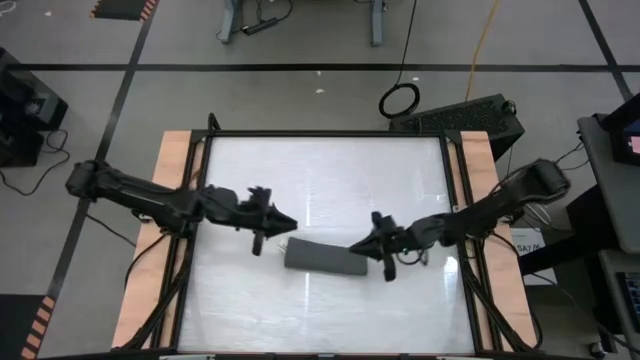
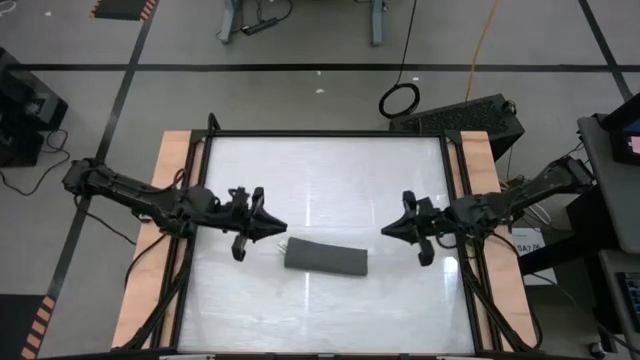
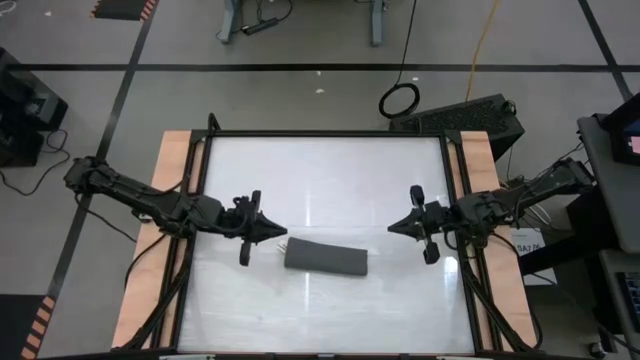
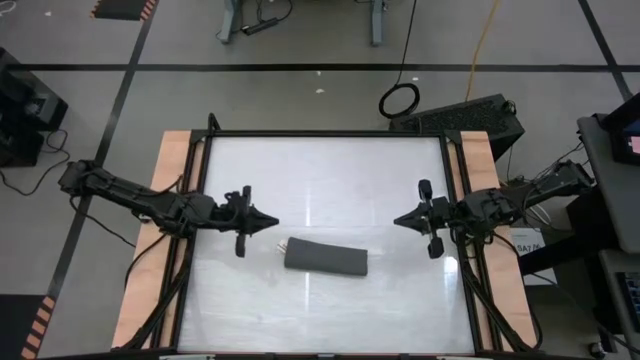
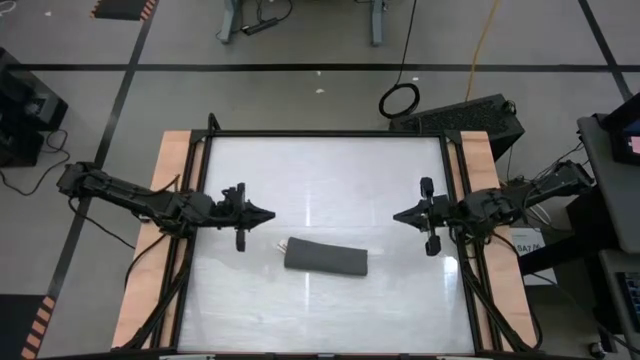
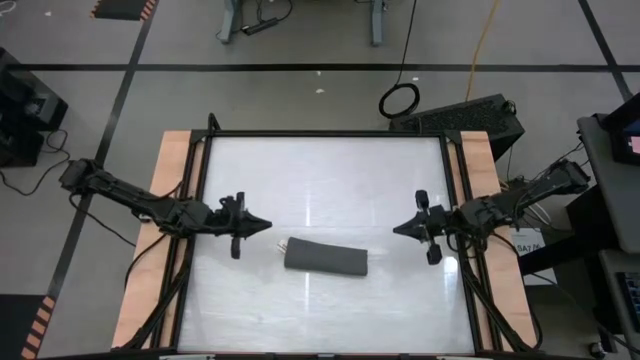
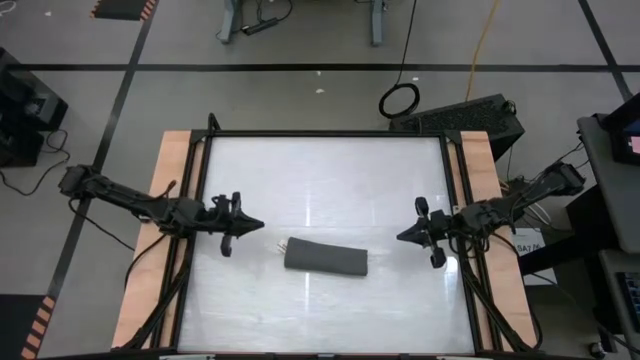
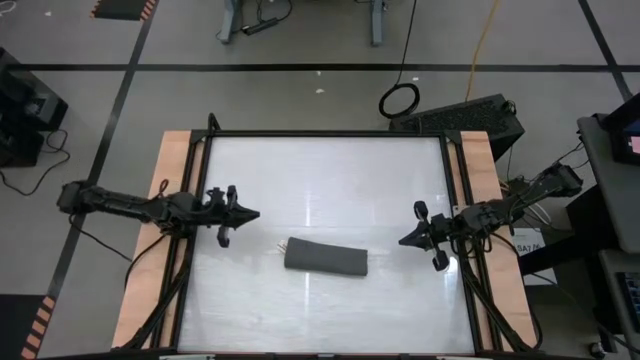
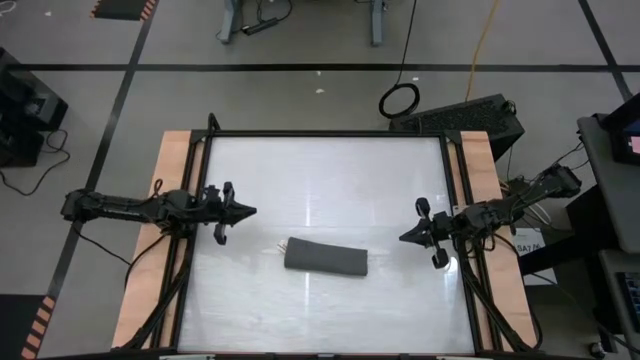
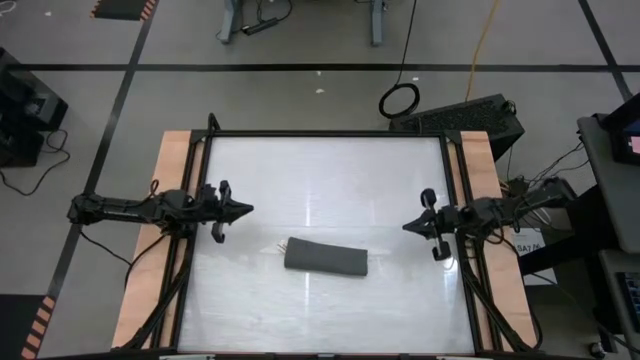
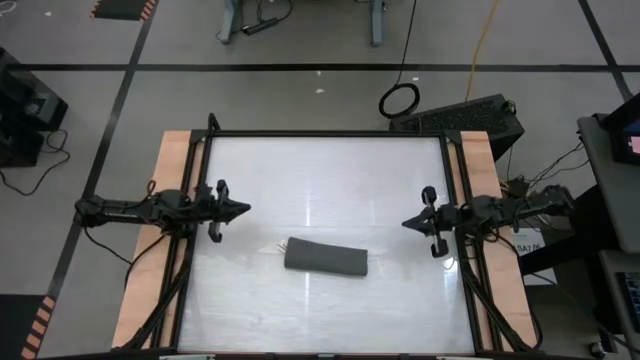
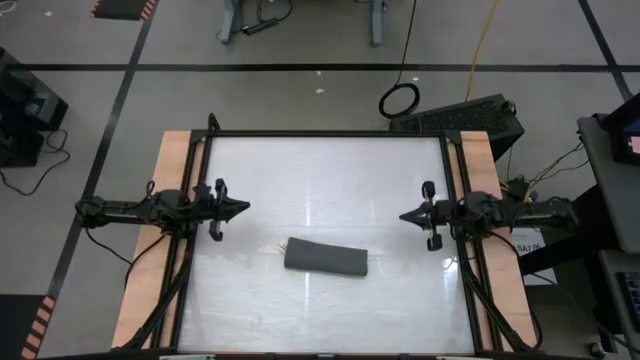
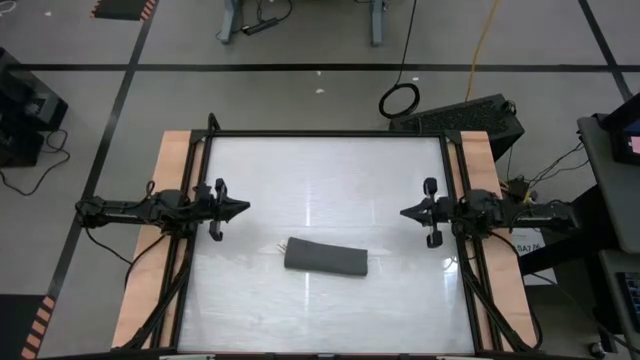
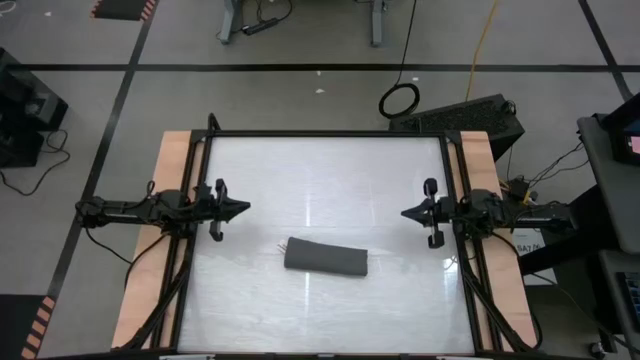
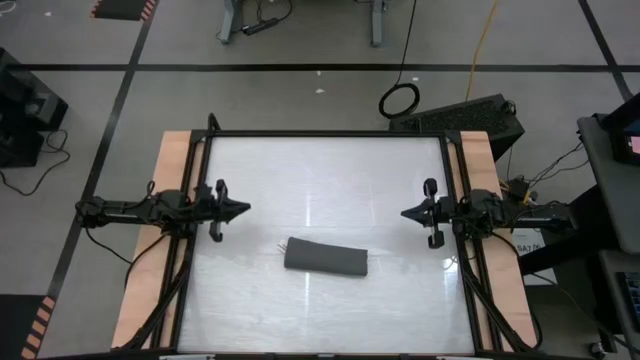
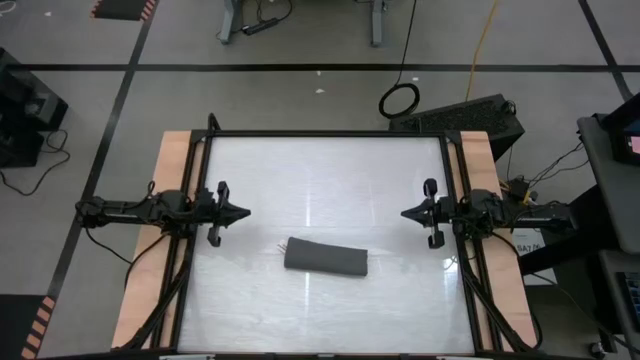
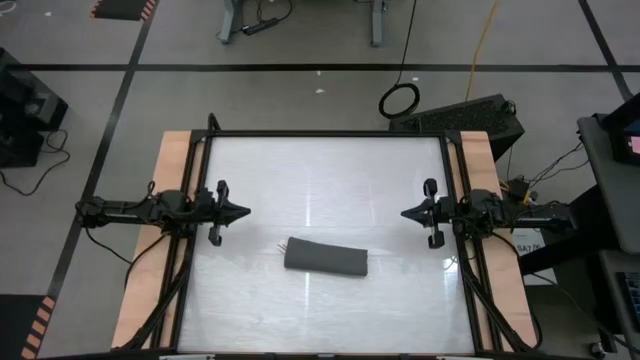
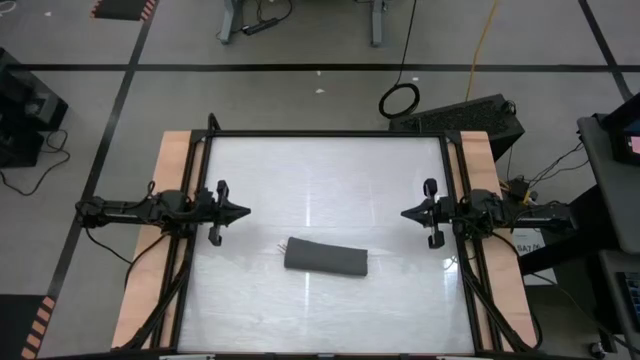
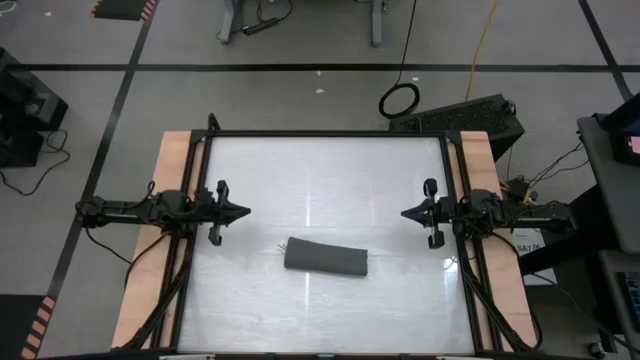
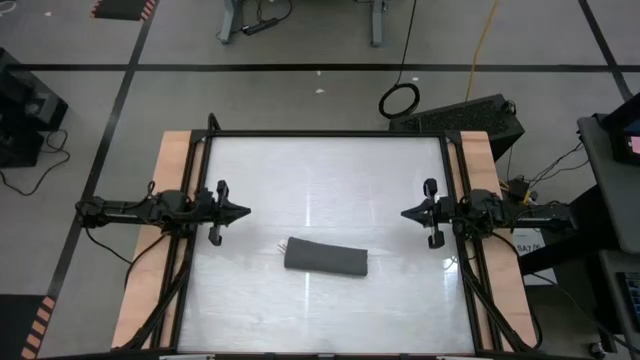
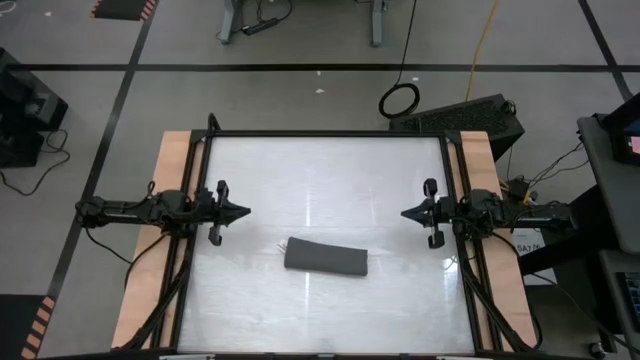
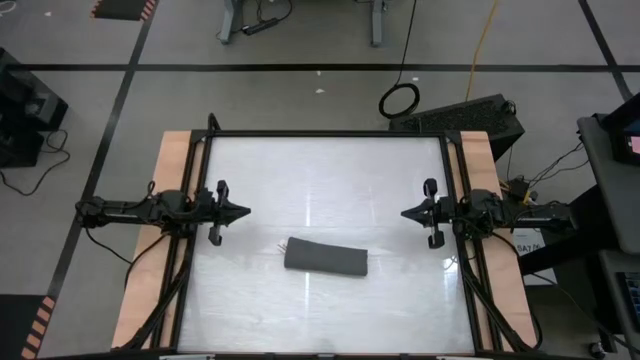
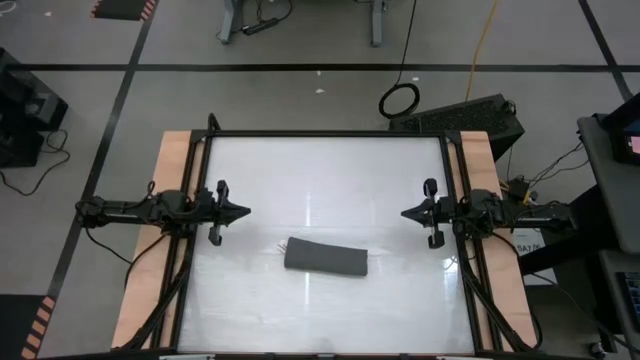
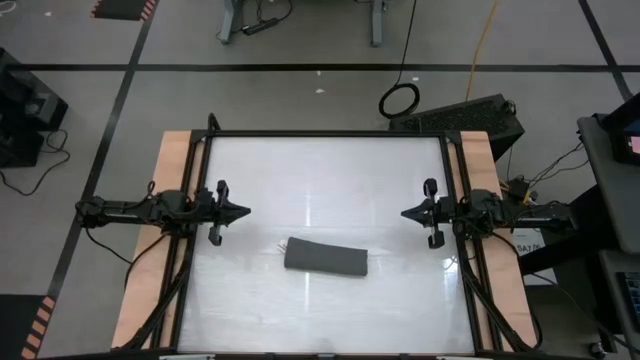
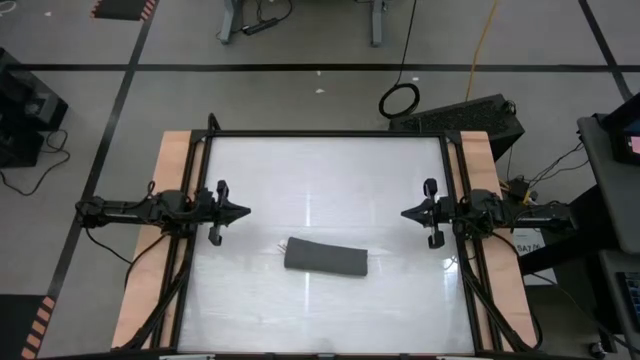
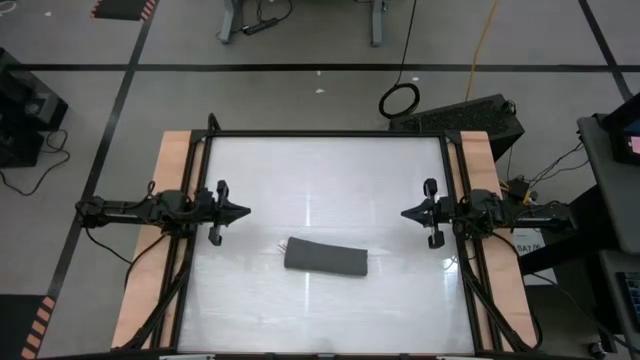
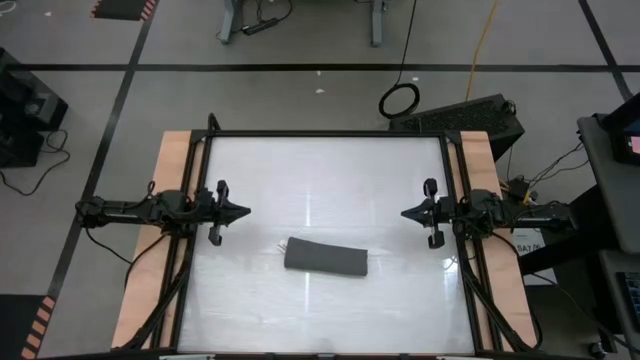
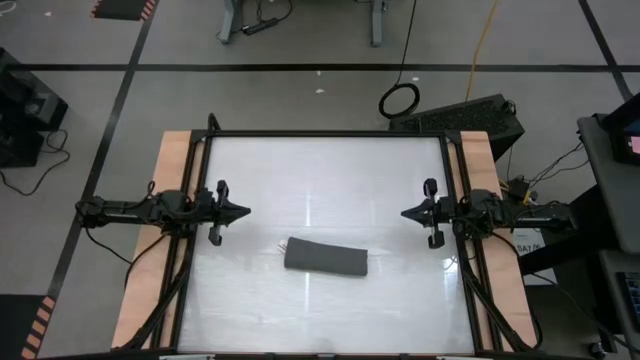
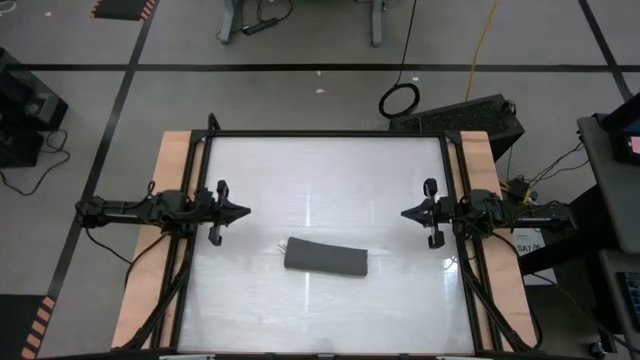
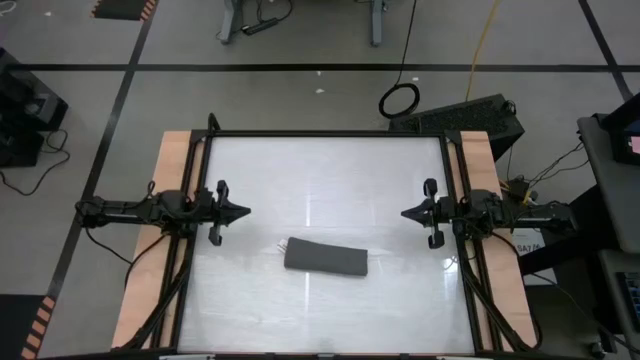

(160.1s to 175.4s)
Task: Roll towel
Return to Home Position

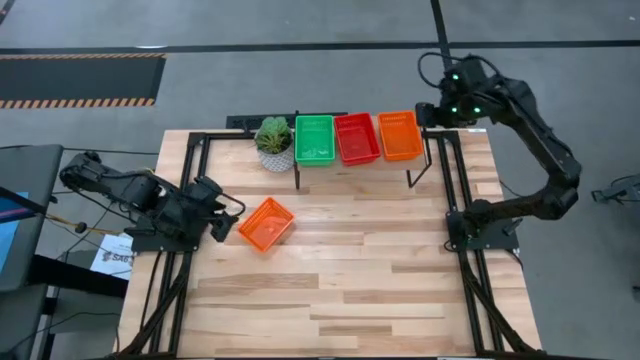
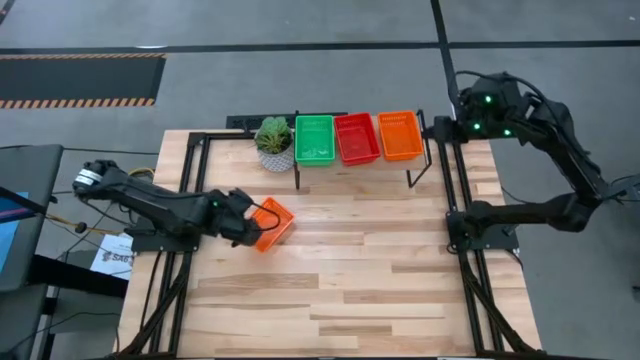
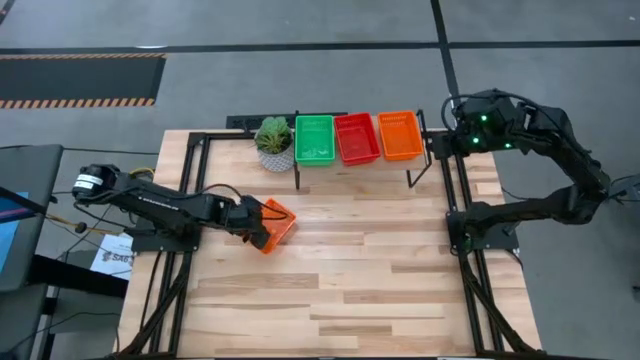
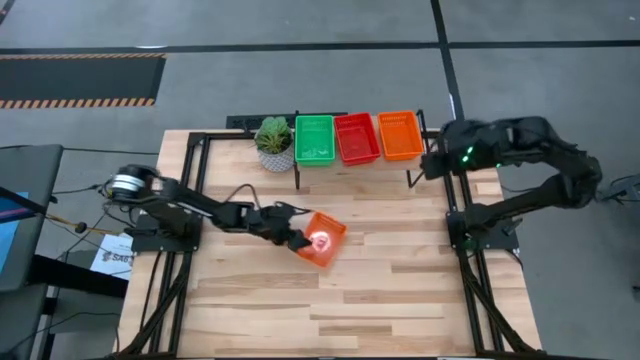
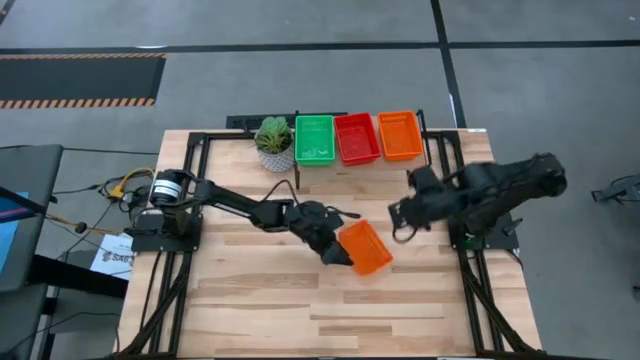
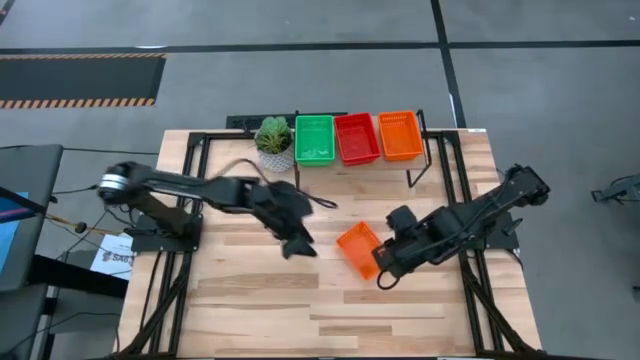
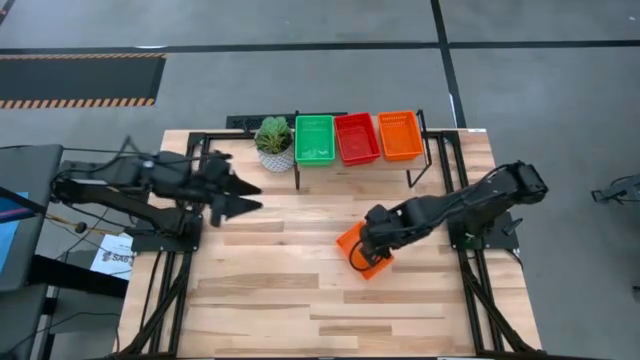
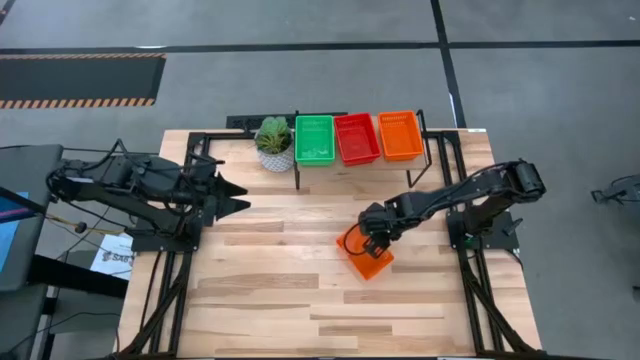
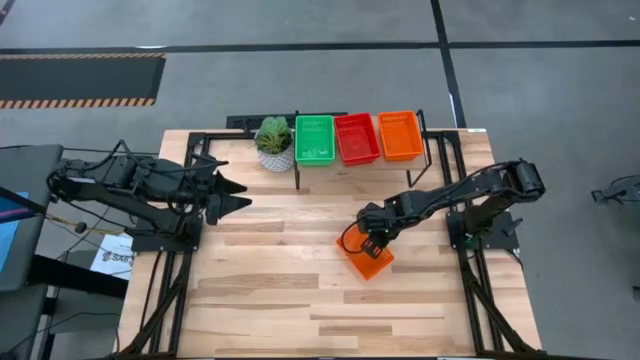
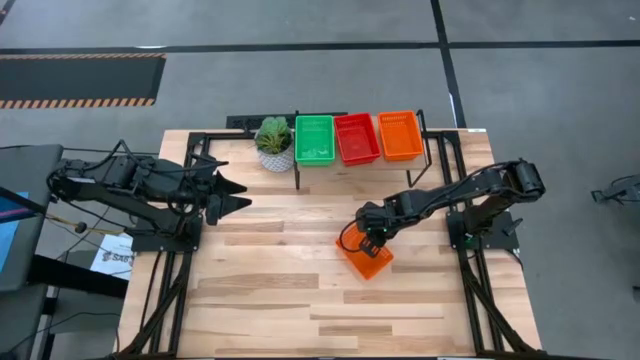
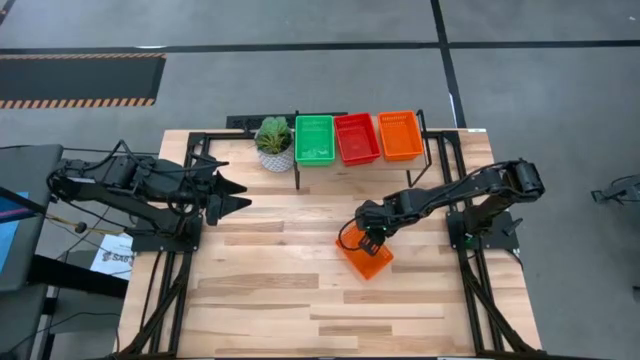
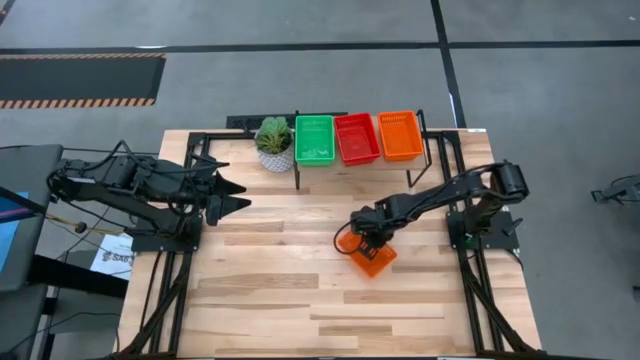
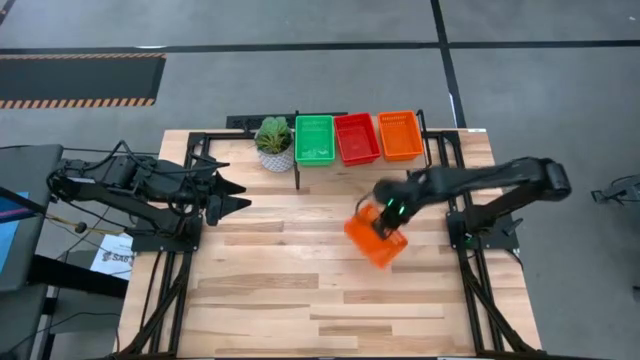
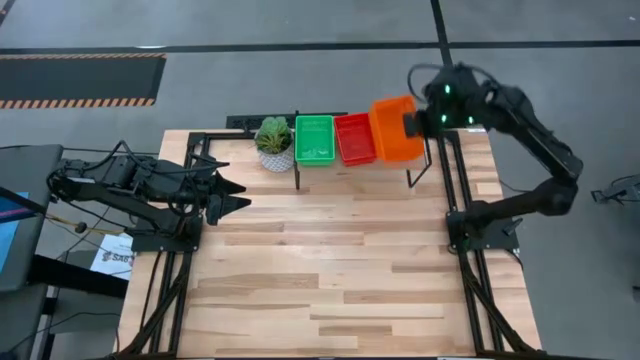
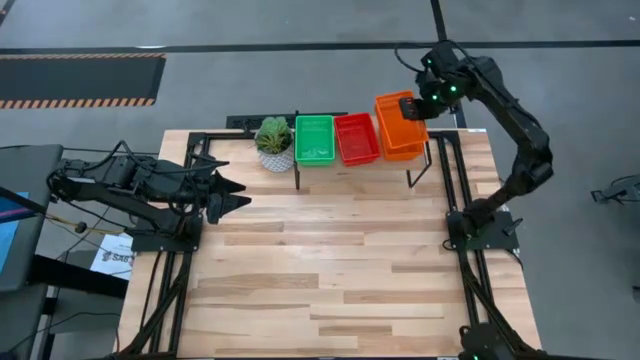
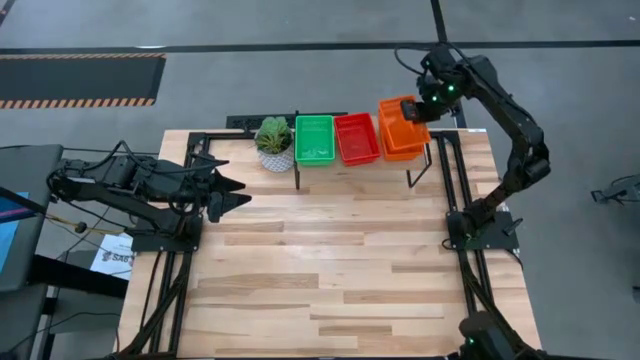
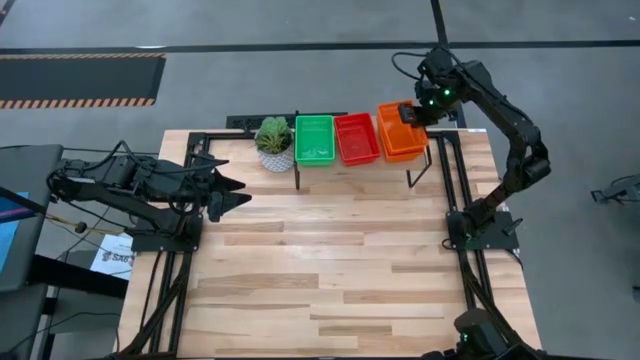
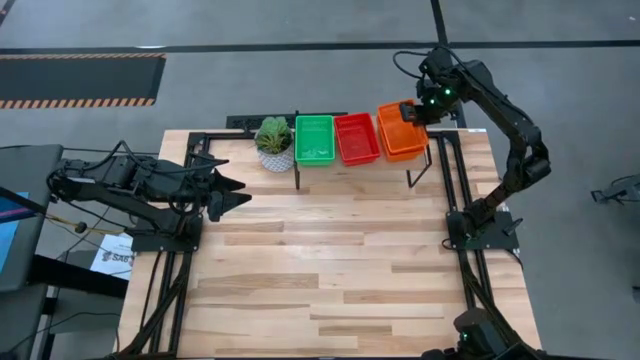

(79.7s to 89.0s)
Task: Stack baskets on shelf by color
Stack the orange bin on top of the orange bins on the shelf
